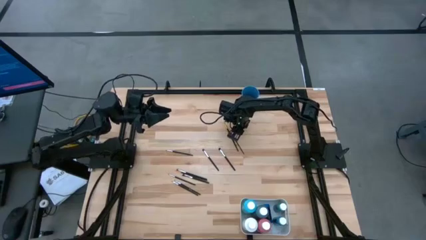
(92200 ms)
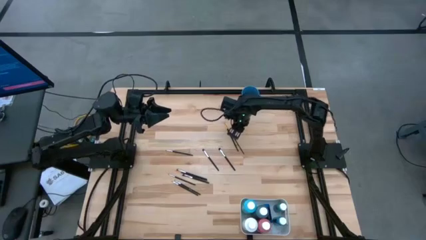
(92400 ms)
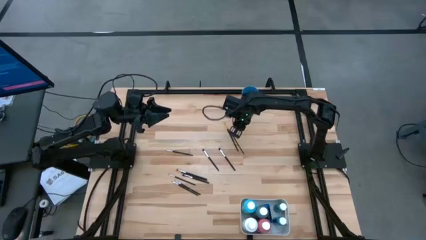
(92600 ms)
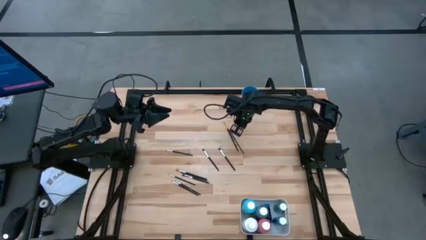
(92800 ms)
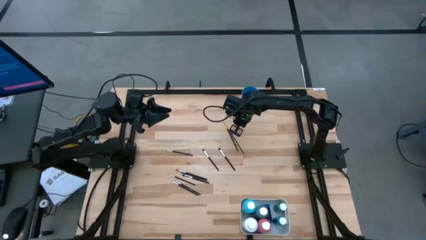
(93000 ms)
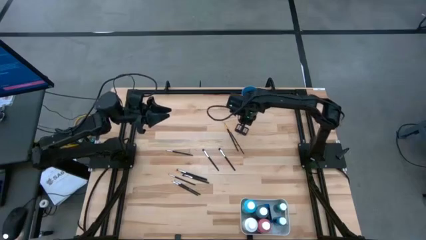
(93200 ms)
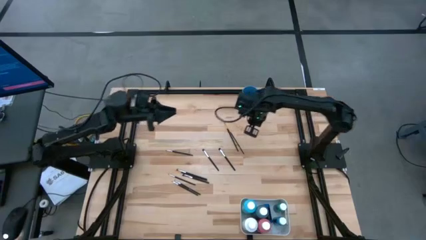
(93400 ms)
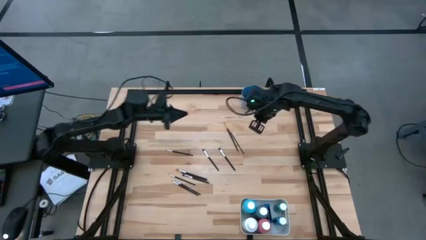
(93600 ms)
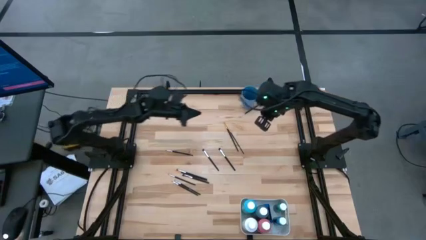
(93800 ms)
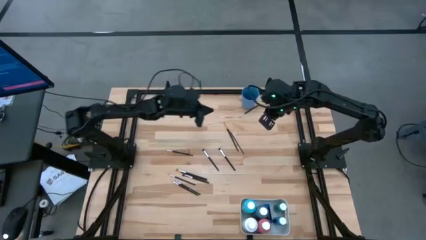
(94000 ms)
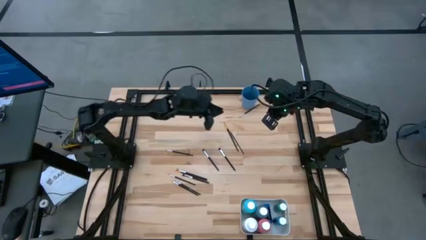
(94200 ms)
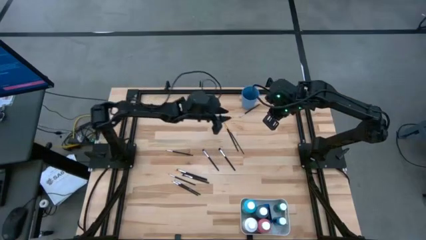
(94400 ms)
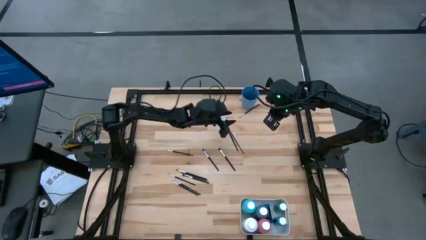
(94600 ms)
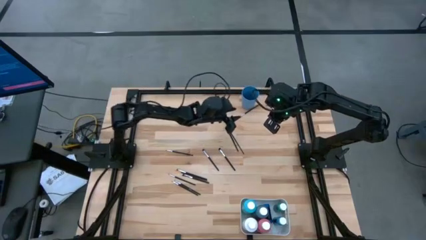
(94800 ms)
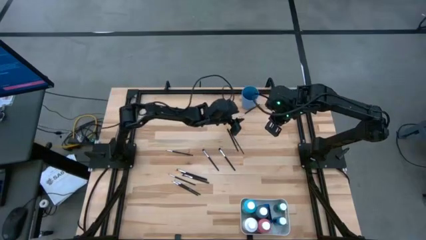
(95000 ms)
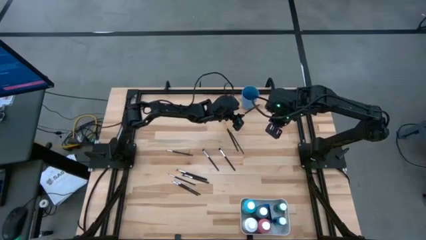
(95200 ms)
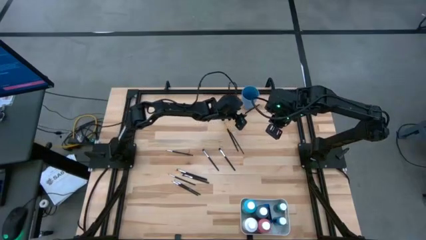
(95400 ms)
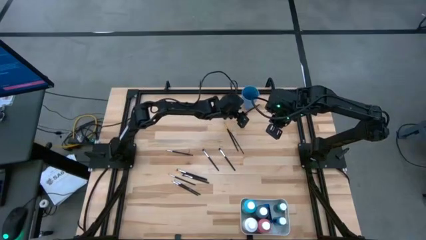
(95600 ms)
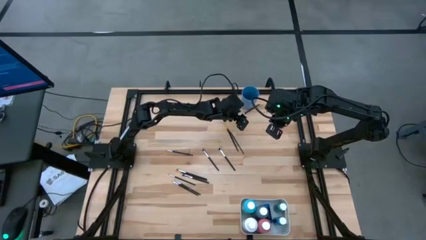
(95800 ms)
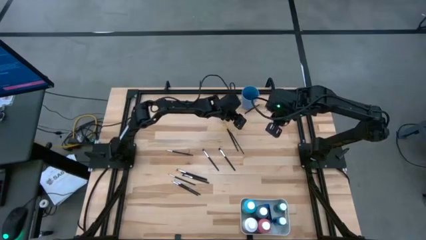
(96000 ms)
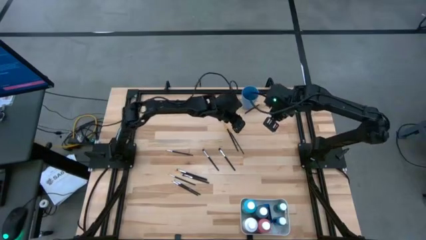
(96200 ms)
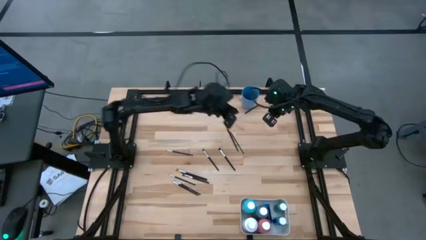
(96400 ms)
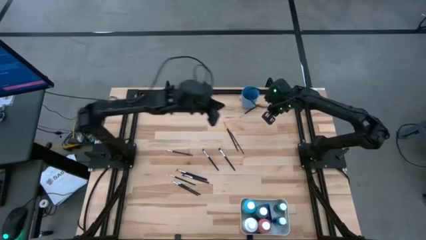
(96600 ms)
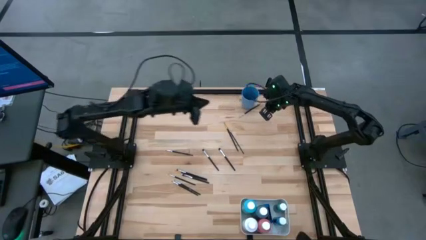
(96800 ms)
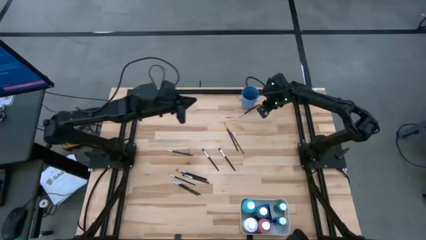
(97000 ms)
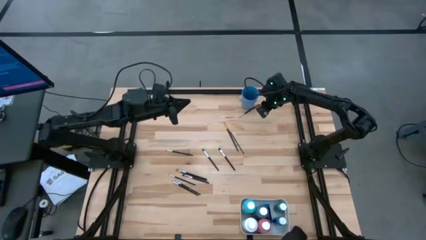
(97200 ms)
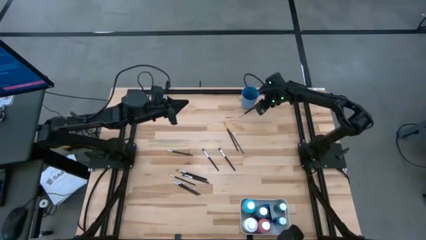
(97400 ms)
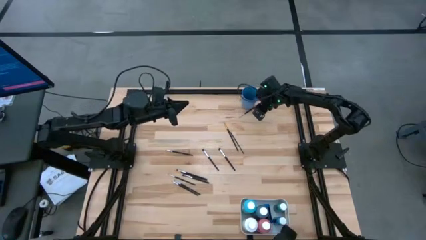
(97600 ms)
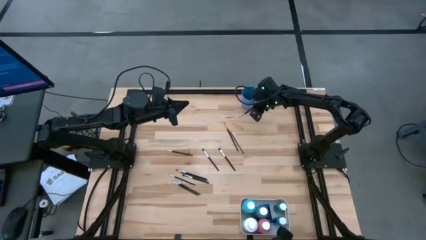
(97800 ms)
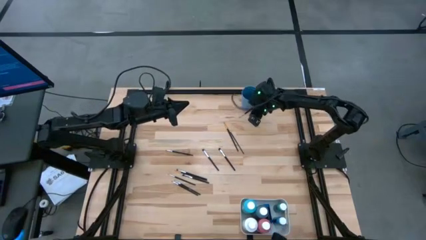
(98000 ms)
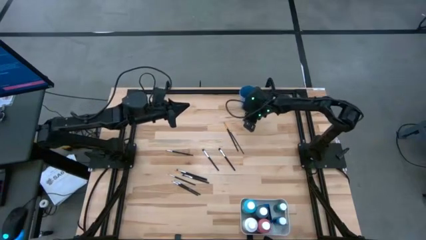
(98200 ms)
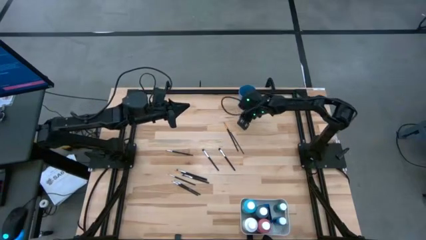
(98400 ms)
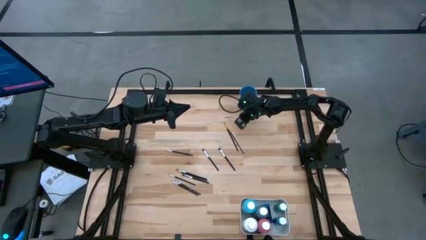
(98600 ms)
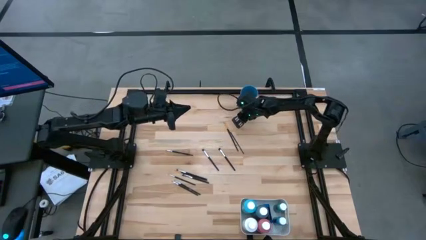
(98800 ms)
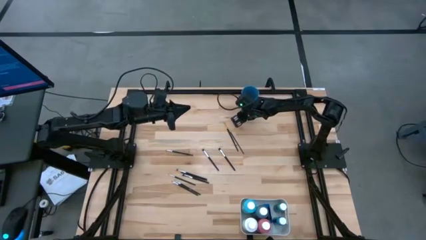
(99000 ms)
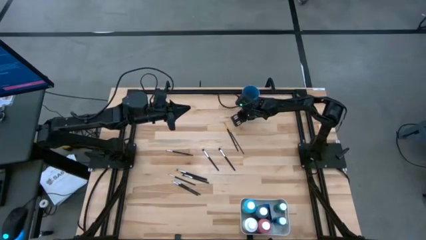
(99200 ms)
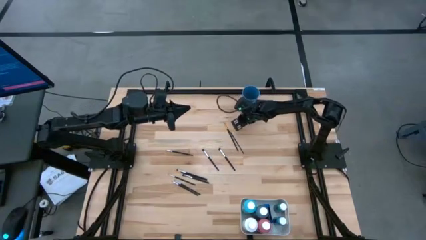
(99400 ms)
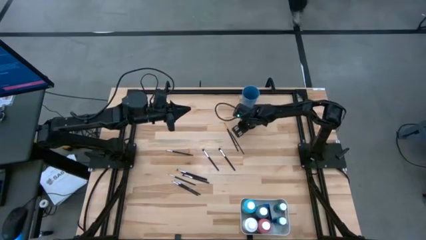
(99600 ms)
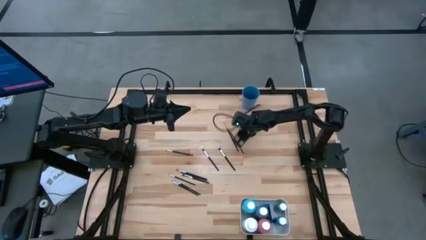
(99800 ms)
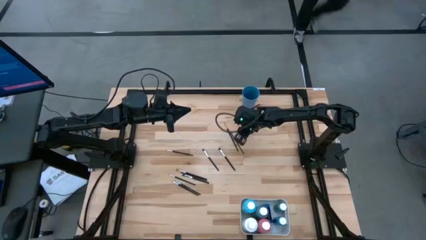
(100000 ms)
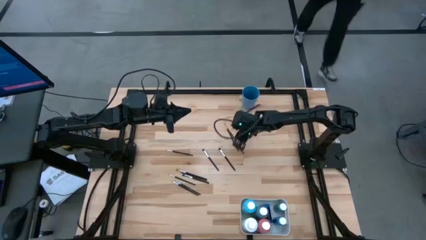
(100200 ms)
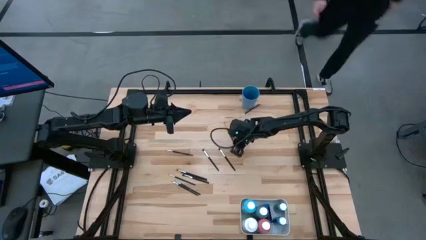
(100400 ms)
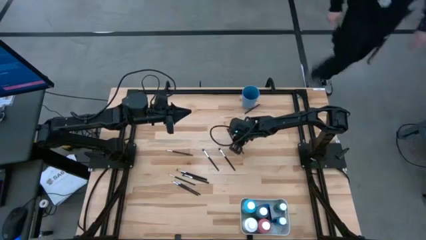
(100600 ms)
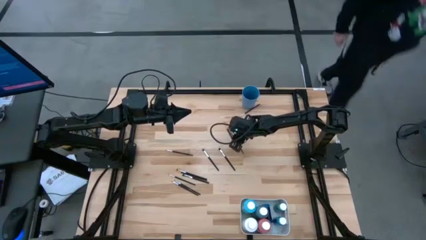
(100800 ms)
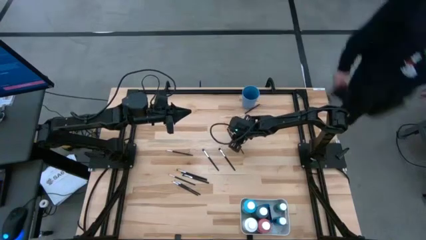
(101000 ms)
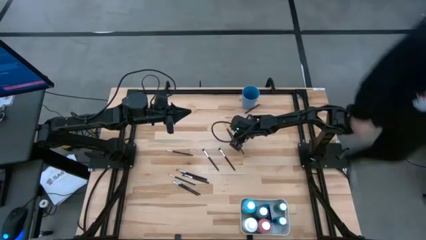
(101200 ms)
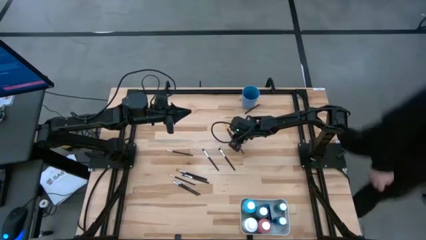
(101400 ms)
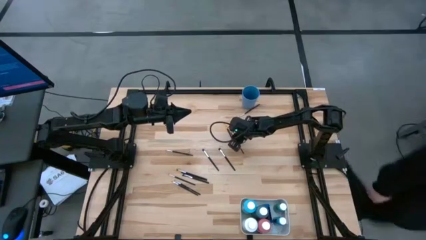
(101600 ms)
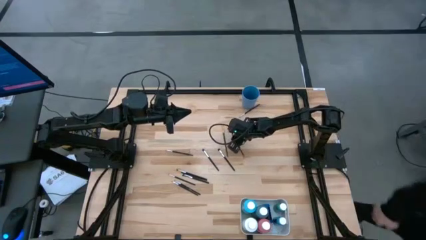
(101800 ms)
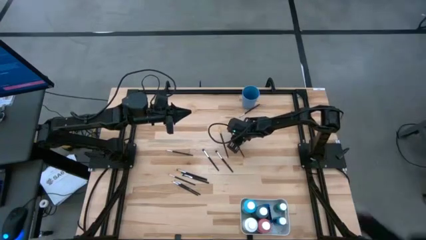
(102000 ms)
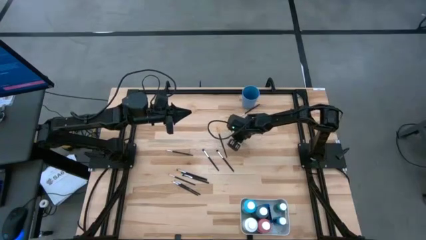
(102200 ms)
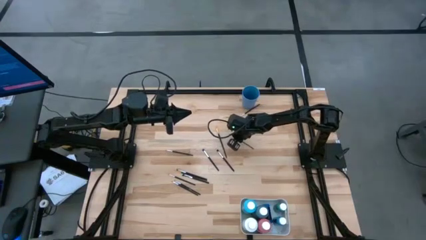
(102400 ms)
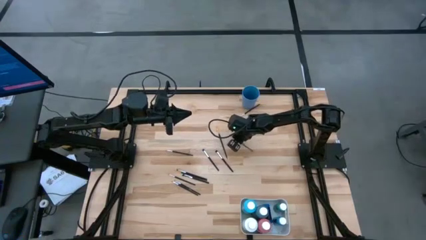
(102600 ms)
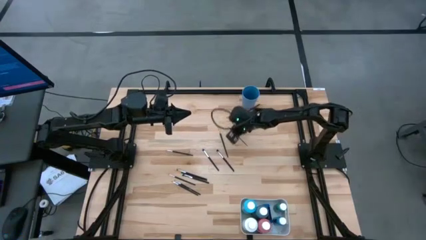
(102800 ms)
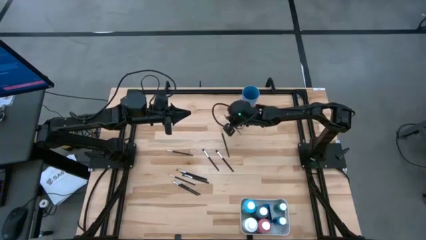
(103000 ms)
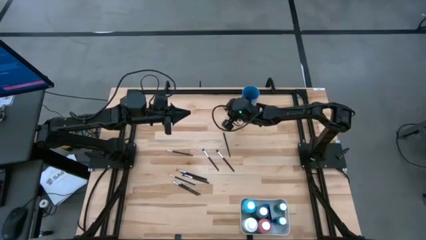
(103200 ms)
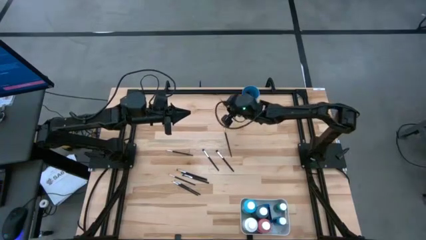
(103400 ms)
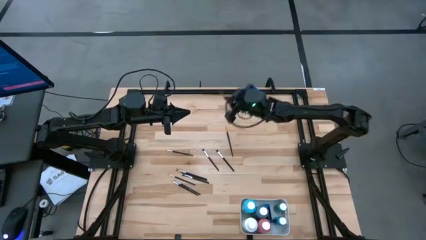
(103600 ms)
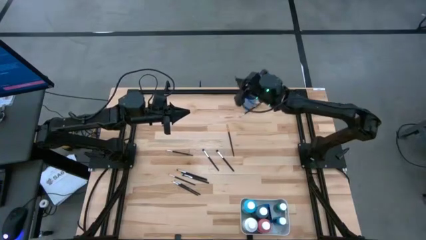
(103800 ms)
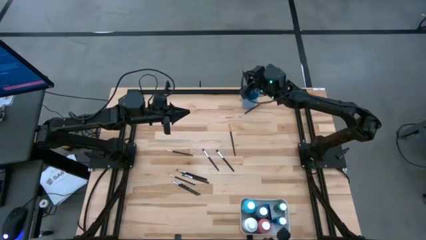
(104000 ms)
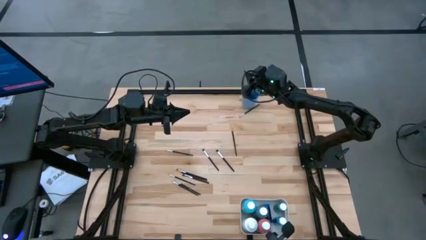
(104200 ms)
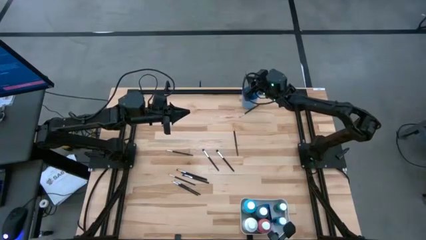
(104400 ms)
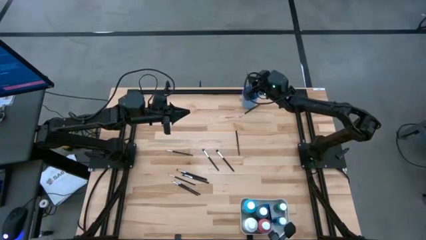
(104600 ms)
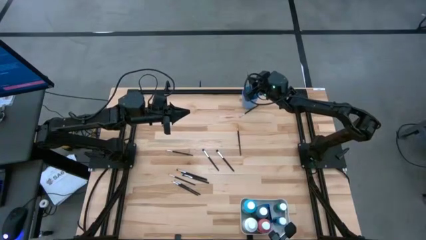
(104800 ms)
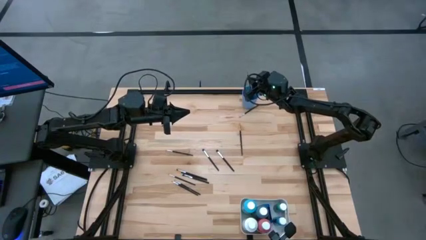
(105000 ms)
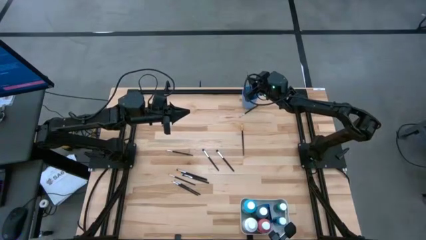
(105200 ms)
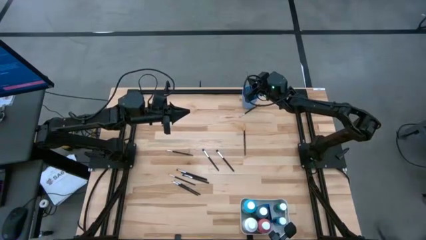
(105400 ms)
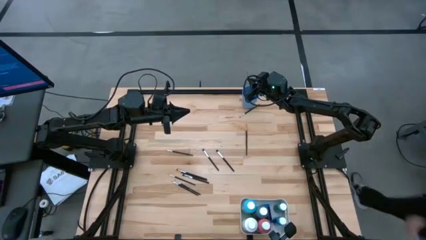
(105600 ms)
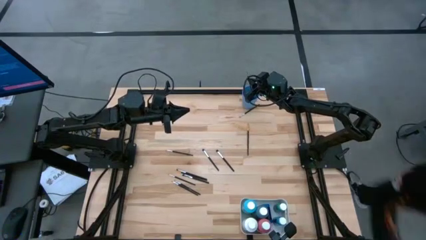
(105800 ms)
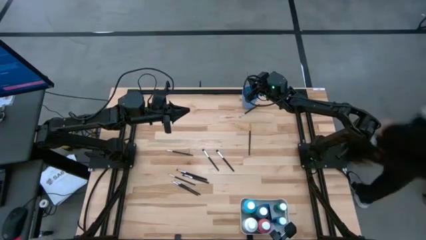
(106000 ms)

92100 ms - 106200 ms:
Task: Pick & Place Paint Supplies
Put the orange paintbrush into the blue cup

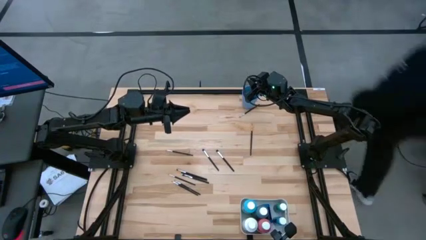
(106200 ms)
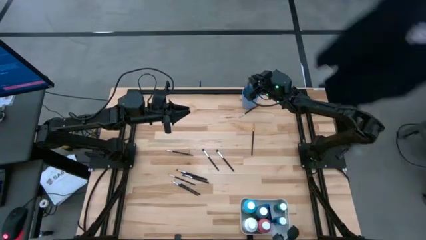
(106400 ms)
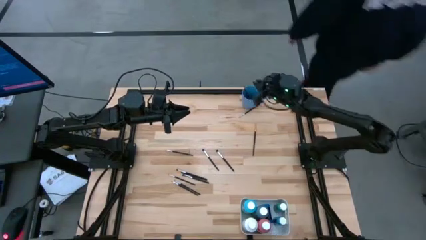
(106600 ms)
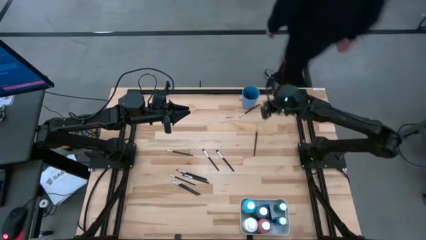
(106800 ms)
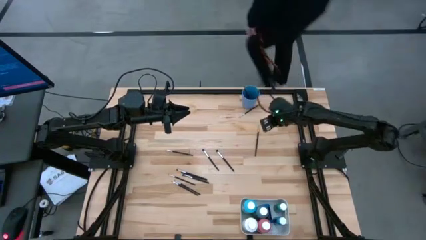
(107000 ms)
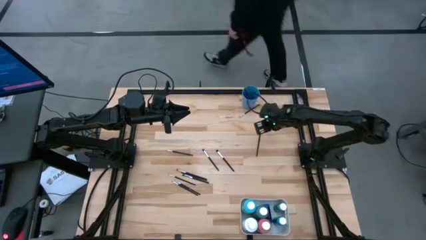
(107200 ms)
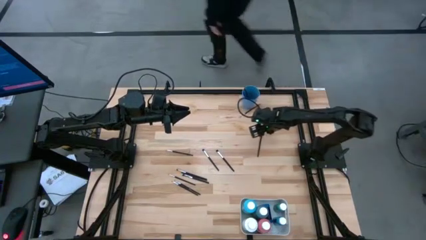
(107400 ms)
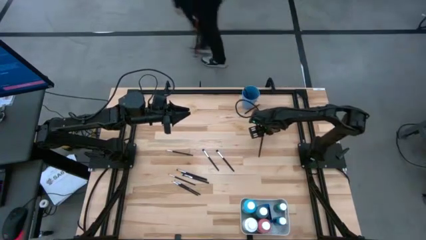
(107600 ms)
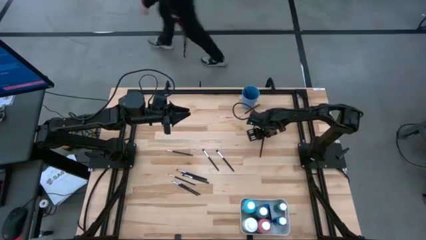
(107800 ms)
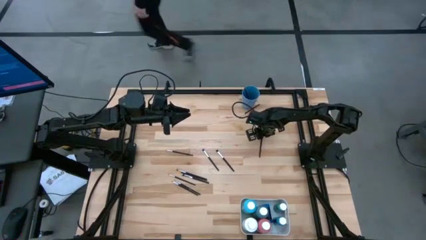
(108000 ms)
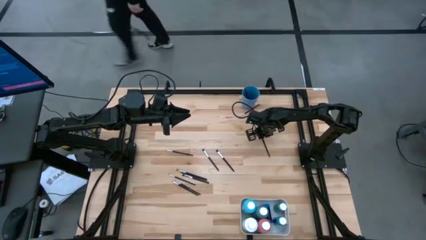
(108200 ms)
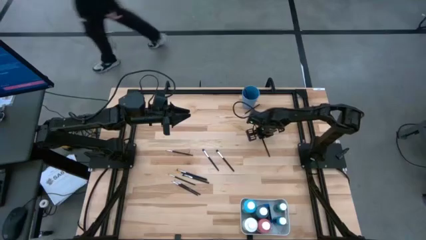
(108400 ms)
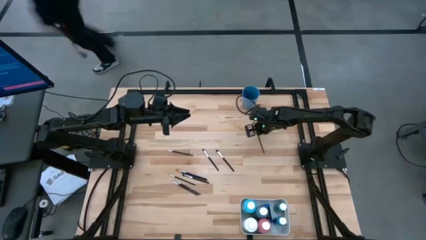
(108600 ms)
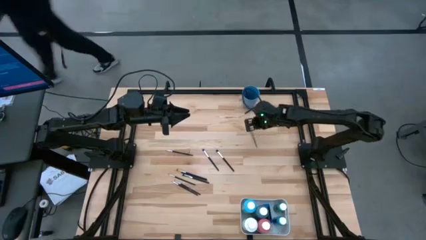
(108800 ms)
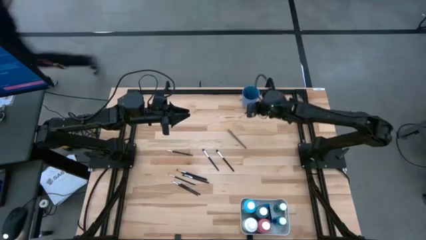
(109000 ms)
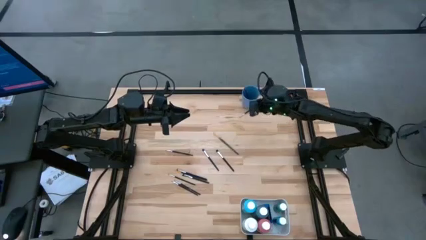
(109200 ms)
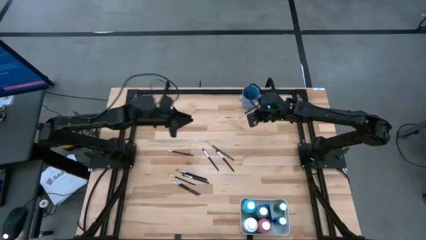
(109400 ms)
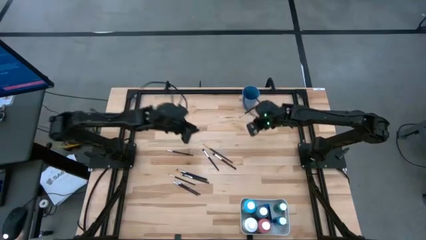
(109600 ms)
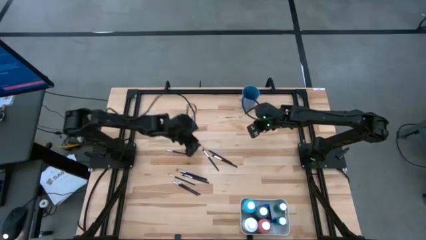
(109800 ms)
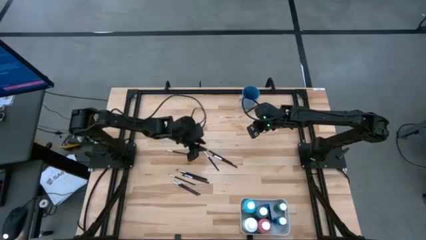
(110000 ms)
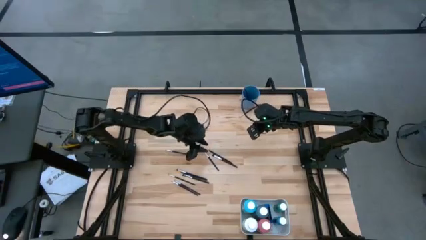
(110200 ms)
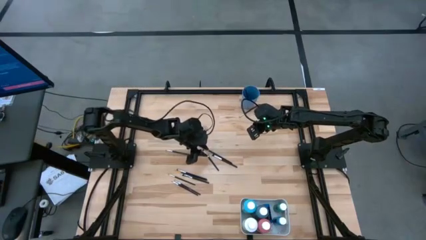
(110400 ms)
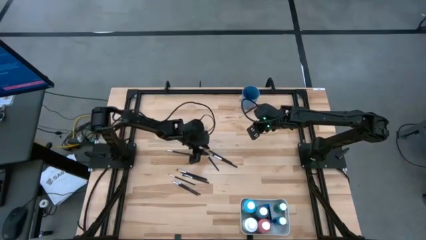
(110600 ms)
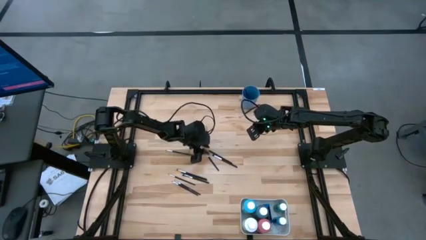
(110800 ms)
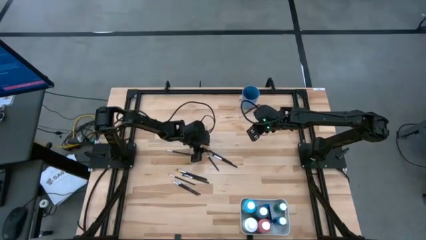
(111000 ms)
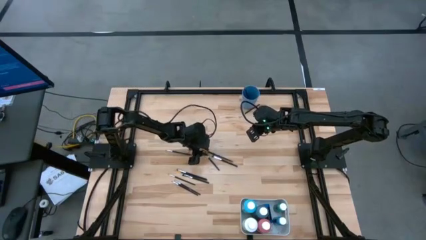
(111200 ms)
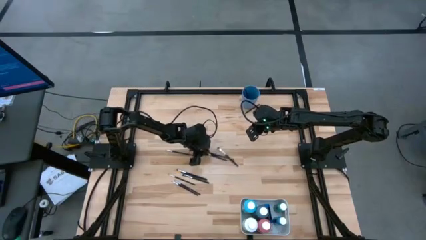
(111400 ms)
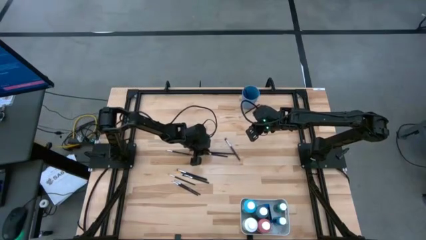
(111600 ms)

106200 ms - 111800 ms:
Put the orange paintbrush into the blue cup
